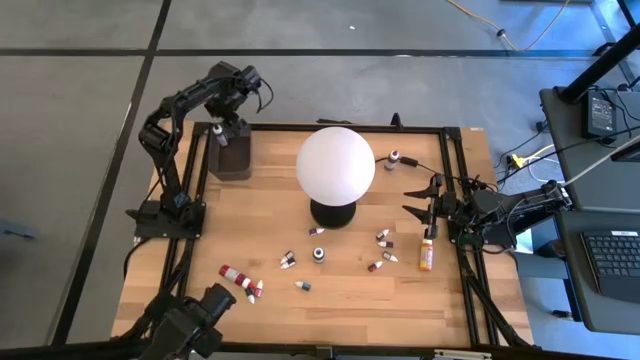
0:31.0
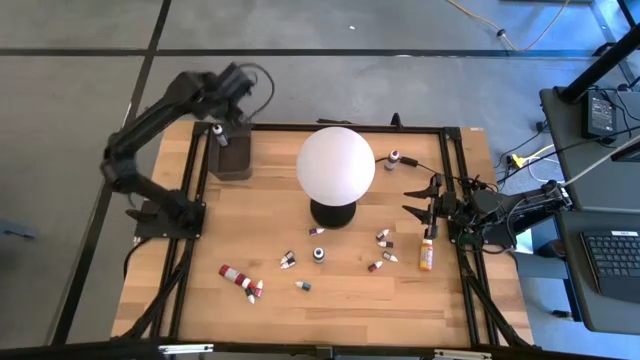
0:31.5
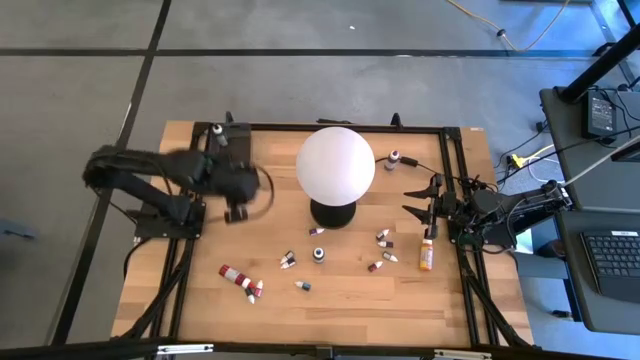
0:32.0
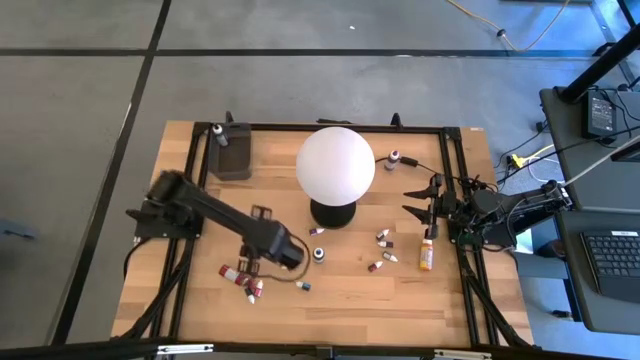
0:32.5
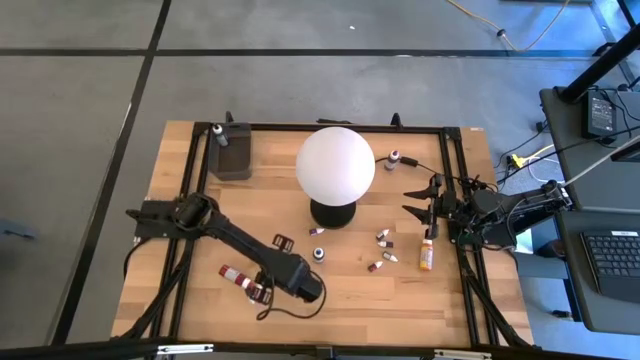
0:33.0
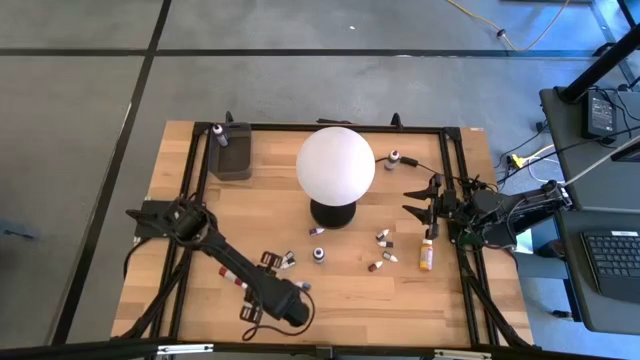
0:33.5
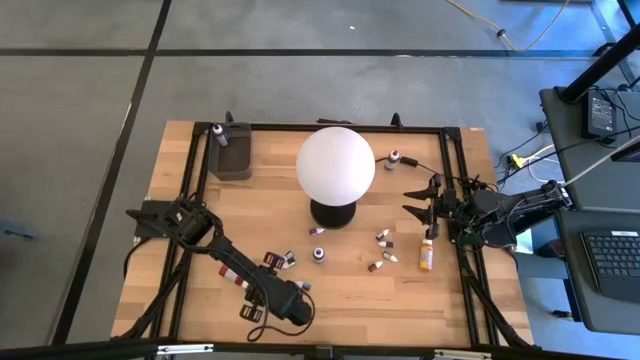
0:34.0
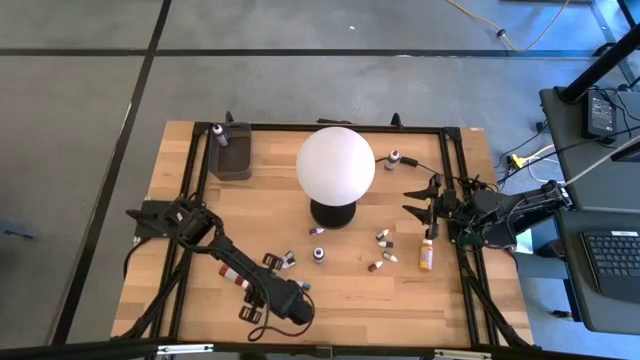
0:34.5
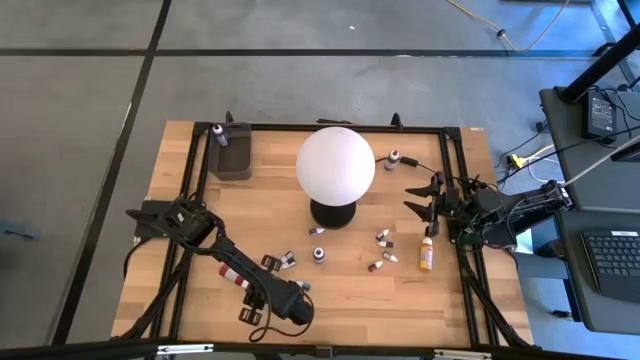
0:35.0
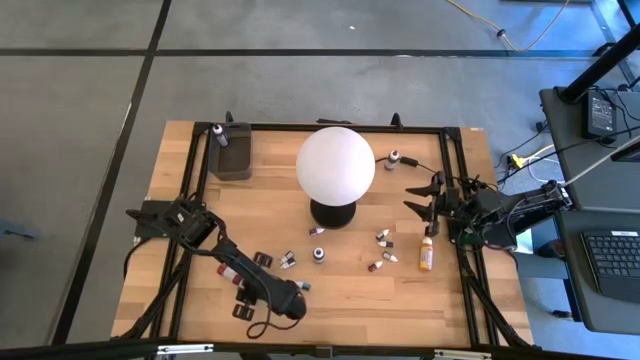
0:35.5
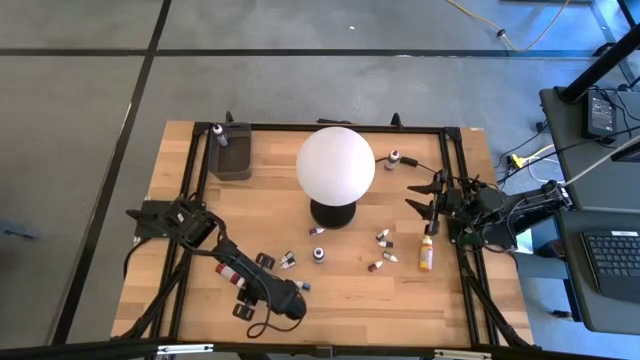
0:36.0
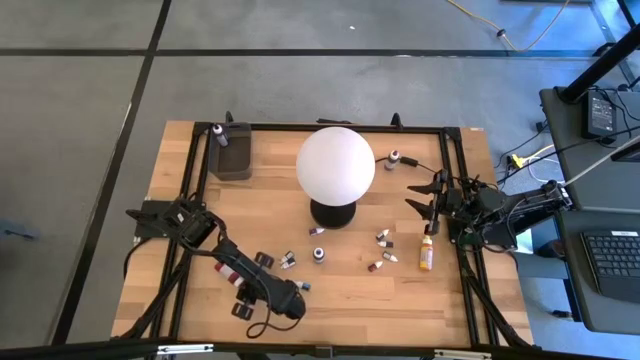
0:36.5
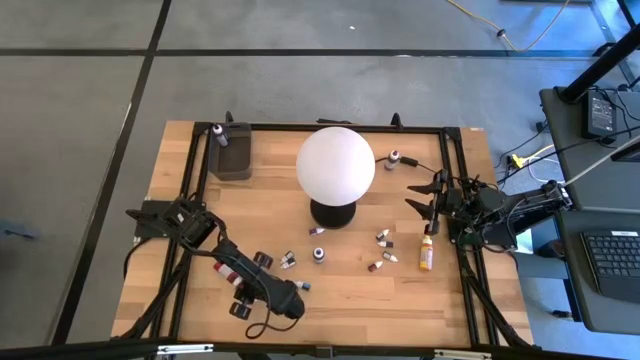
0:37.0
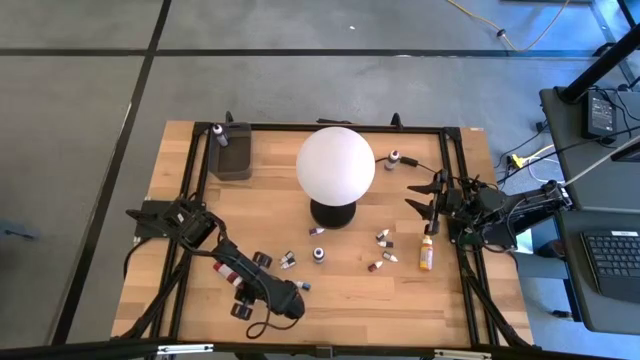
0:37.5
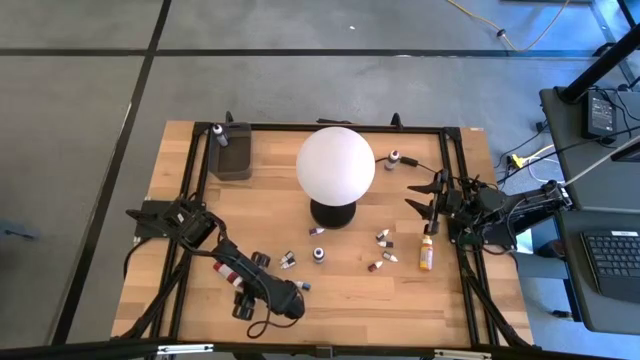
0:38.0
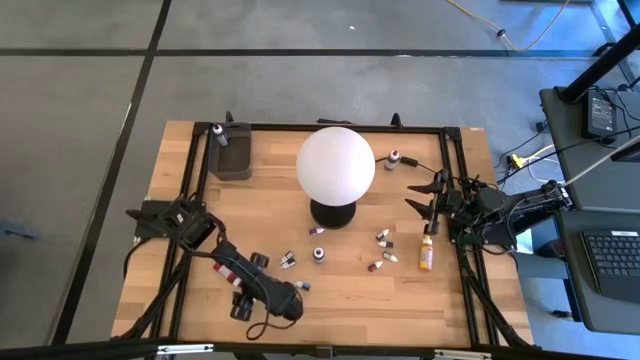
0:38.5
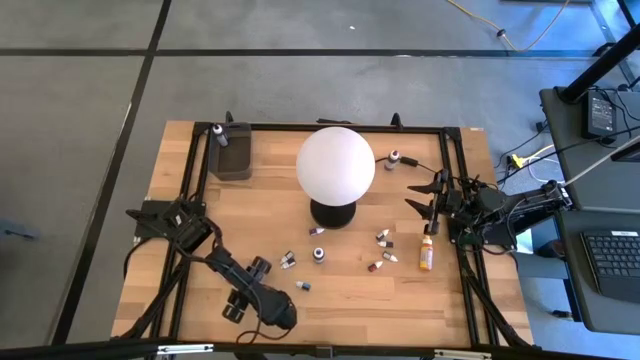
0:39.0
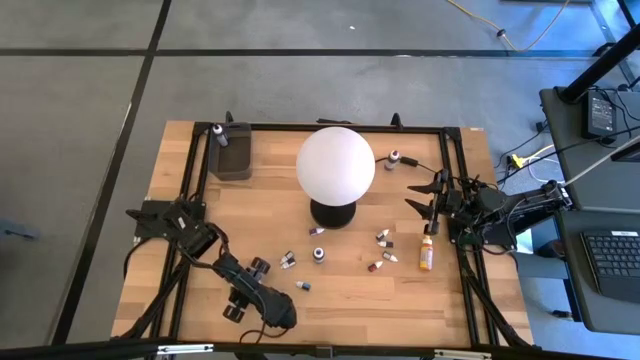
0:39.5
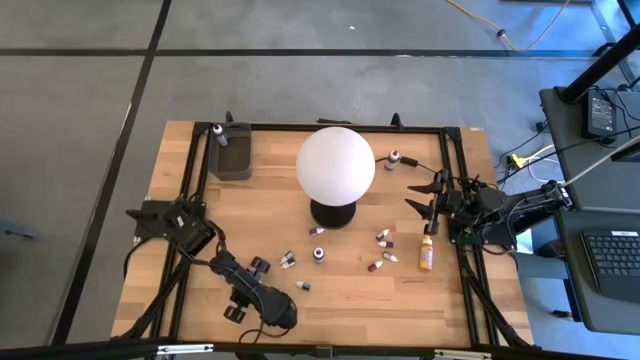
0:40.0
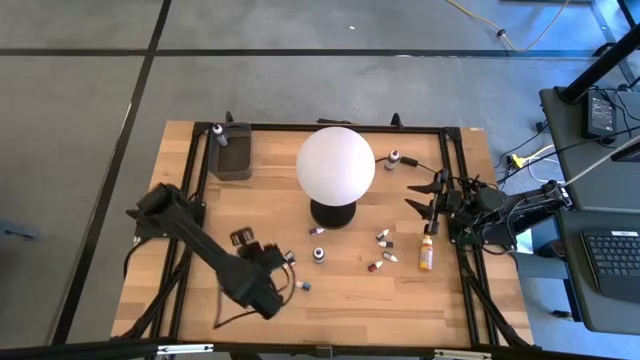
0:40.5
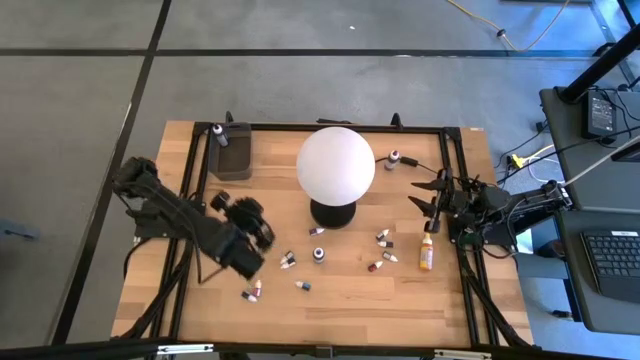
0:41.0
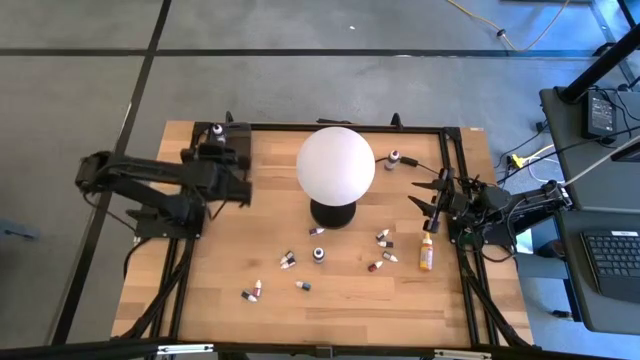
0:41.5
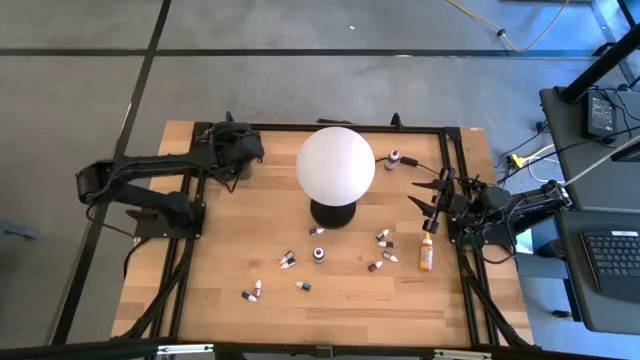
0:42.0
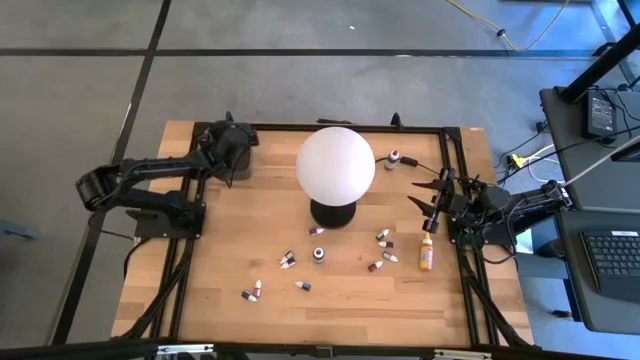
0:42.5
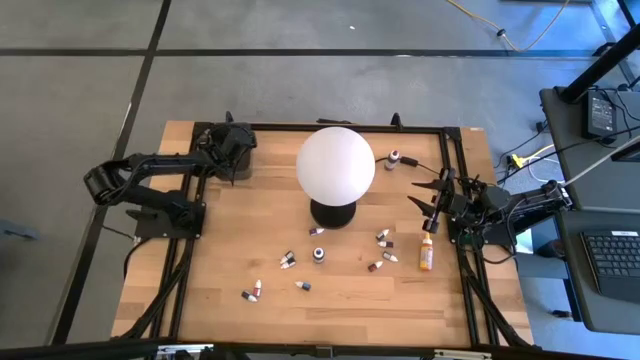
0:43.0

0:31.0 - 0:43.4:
Task: Pick & Place food coloring
Put the big red food coloring bottle into the black container

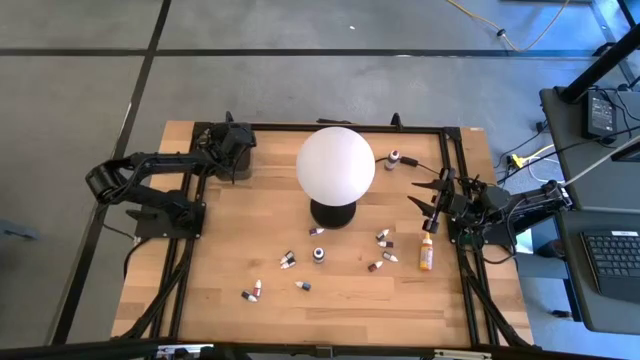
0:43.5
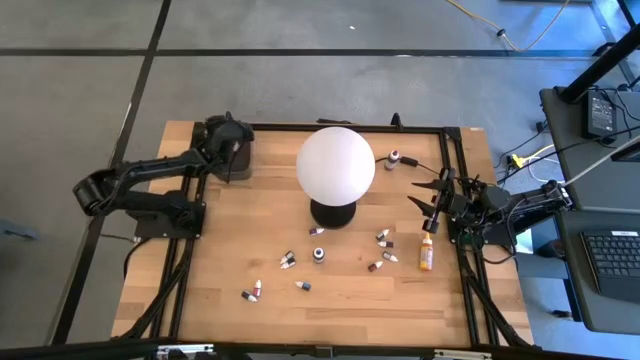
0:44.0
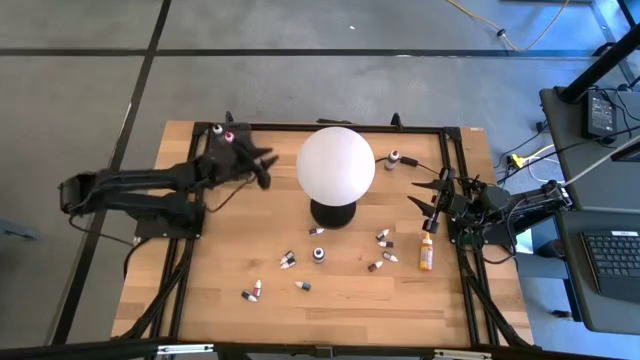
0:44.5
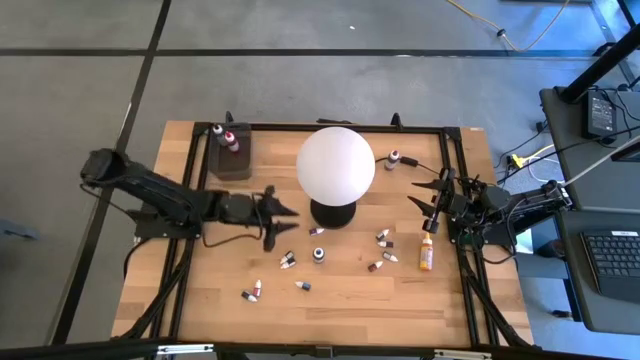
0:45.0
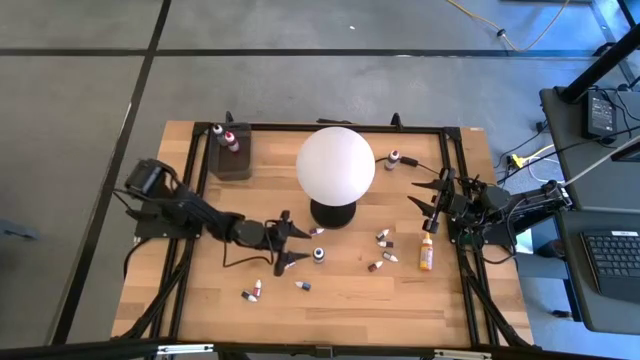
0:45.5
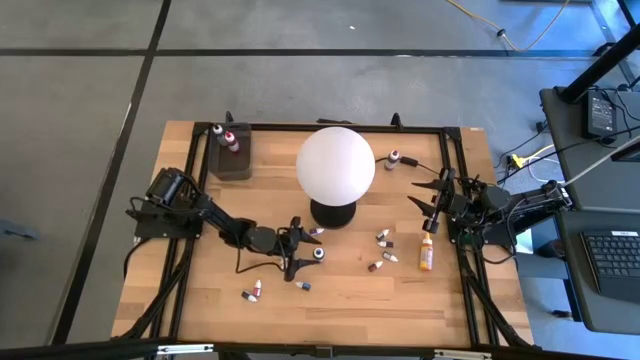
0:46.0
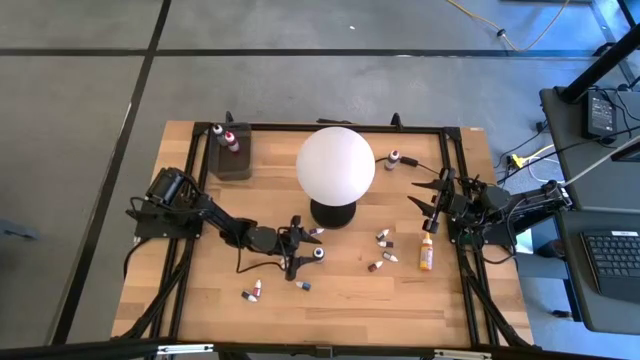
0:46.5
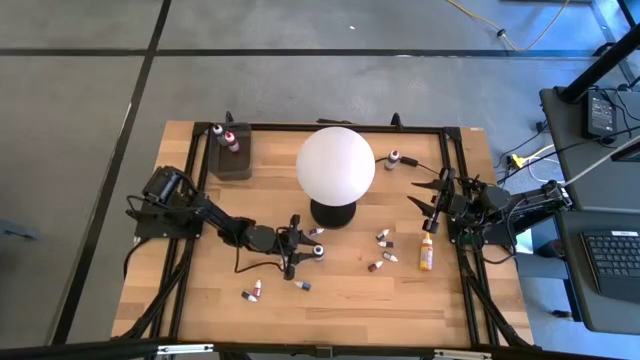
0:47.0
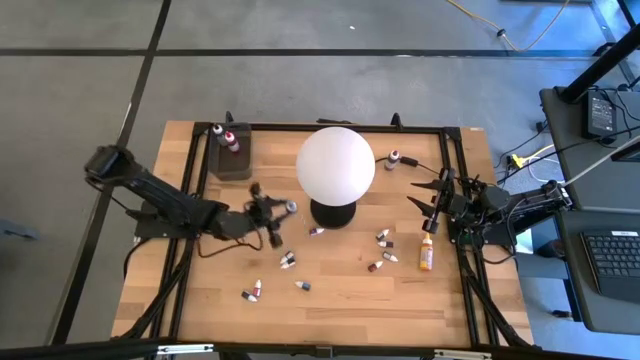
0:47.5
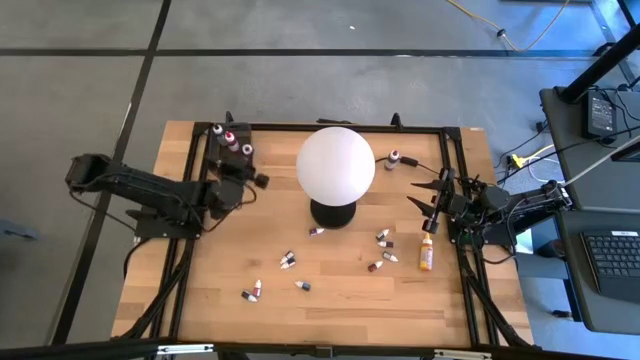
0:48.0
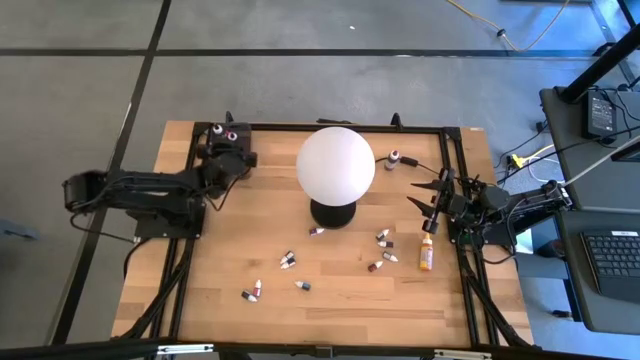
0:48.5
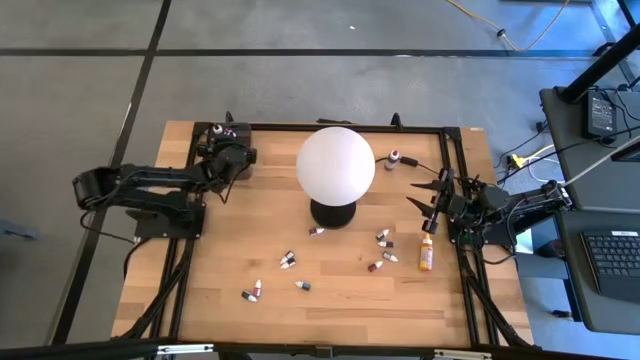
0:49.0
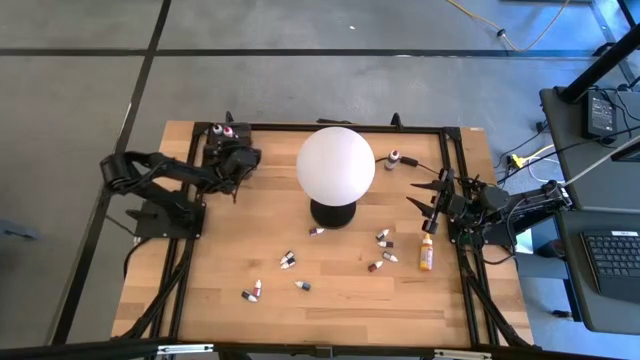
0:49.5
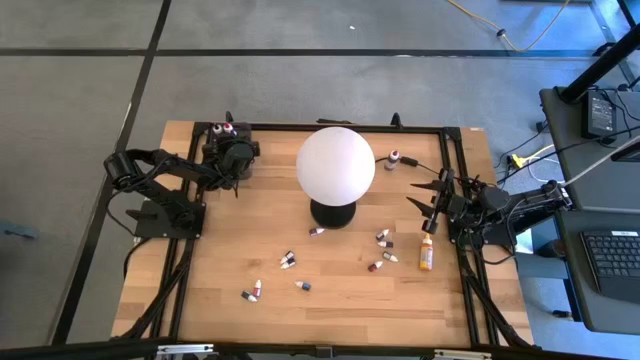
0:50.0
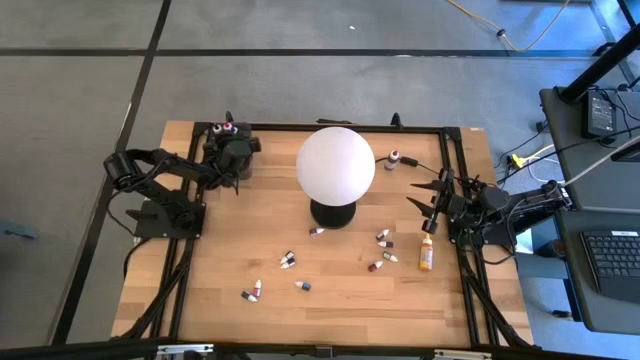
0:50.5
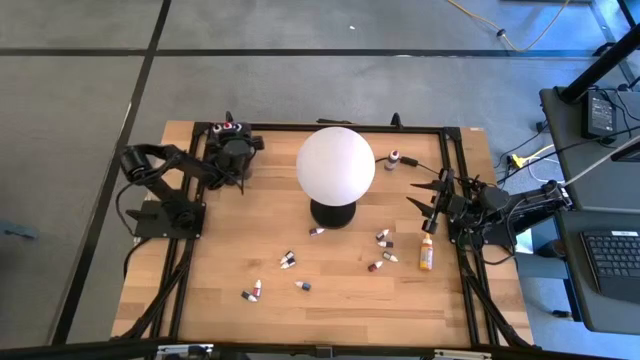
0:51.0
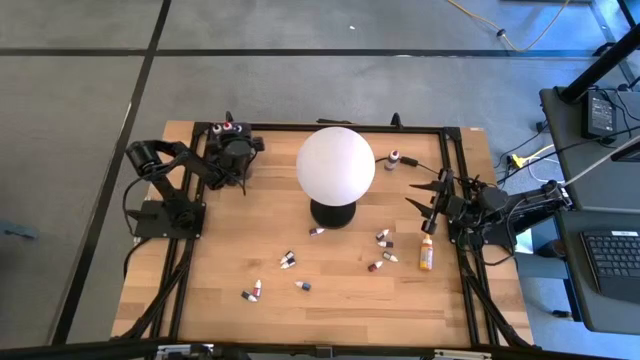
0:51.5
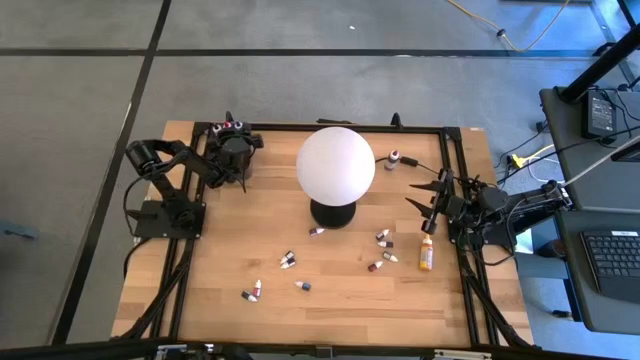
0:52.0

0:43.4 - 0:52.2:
Put the big blue food coloring bottle into the black container
